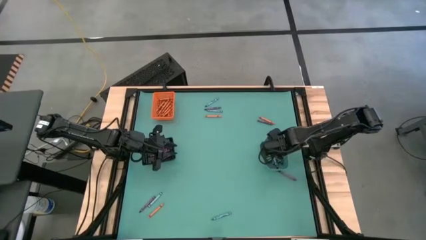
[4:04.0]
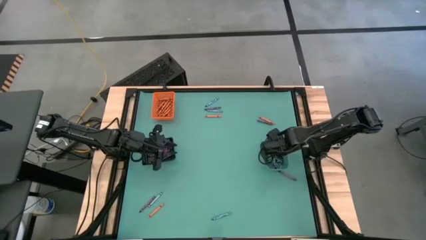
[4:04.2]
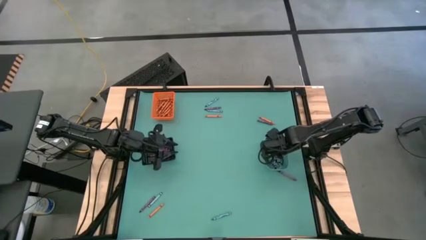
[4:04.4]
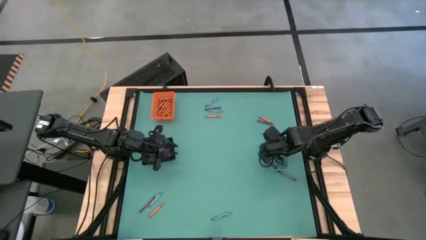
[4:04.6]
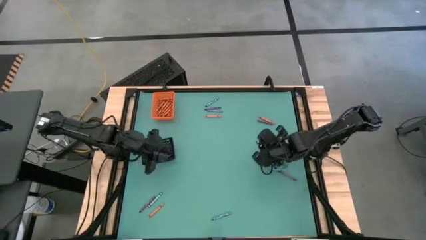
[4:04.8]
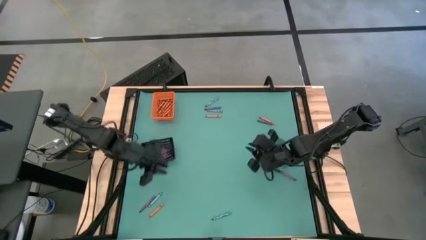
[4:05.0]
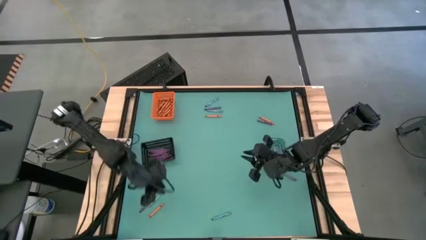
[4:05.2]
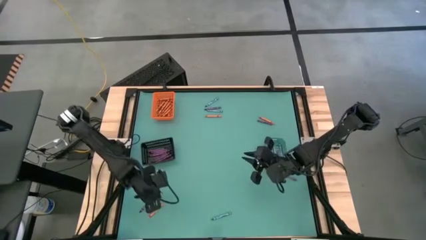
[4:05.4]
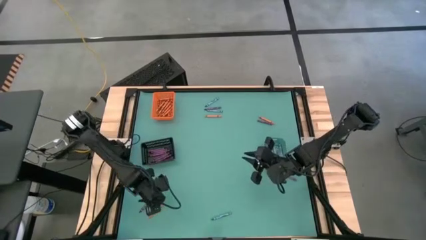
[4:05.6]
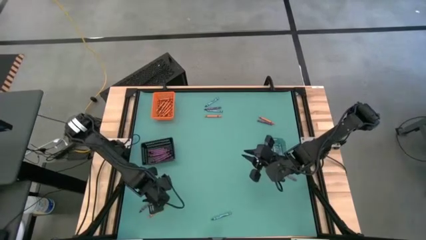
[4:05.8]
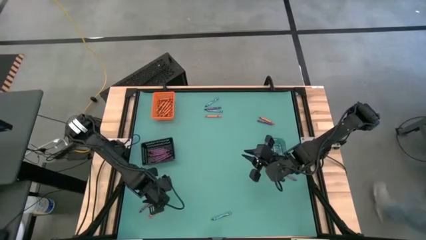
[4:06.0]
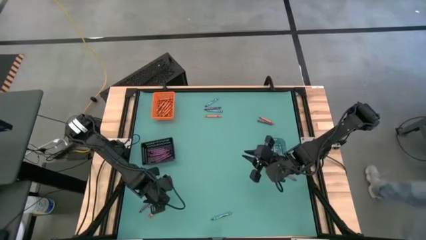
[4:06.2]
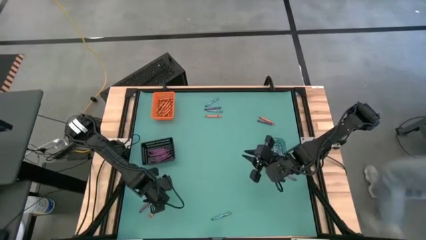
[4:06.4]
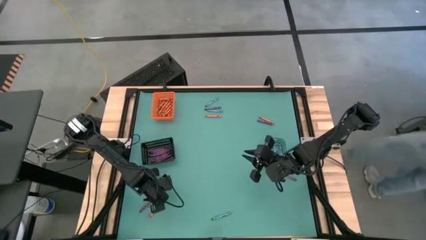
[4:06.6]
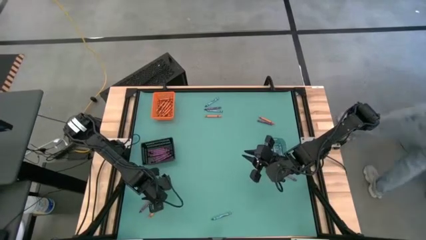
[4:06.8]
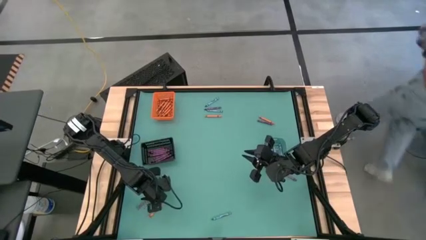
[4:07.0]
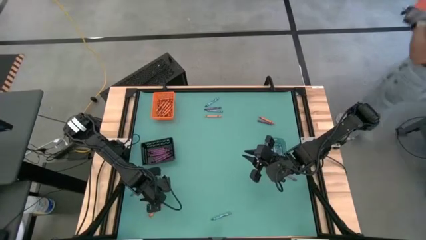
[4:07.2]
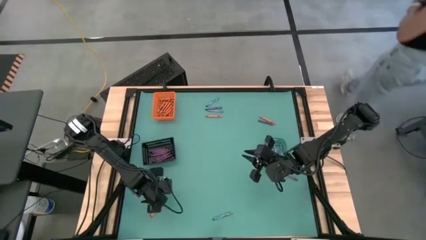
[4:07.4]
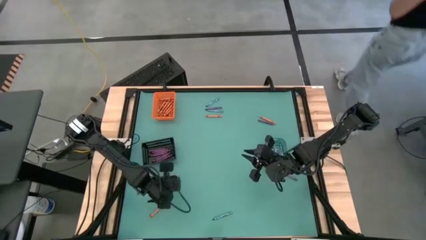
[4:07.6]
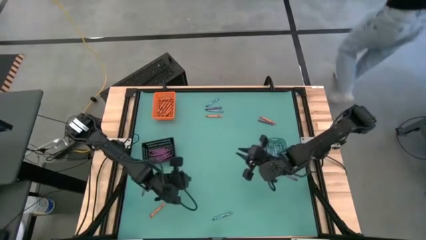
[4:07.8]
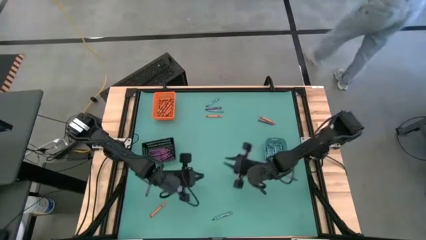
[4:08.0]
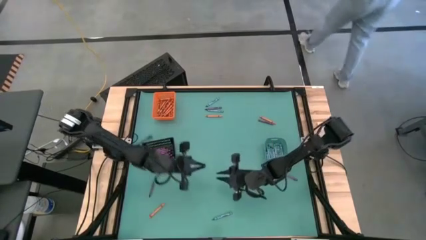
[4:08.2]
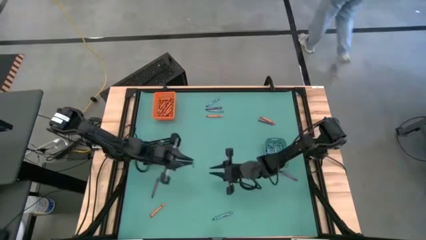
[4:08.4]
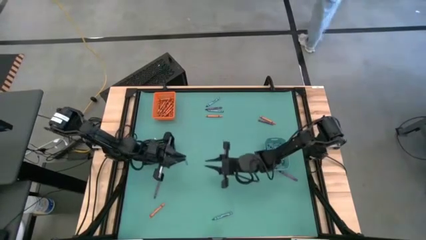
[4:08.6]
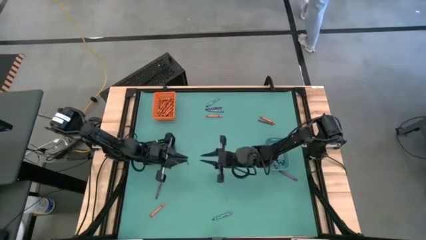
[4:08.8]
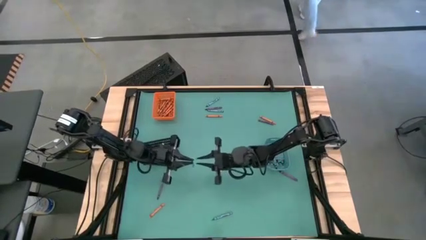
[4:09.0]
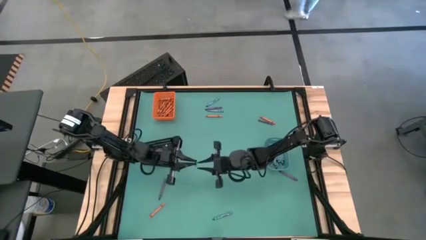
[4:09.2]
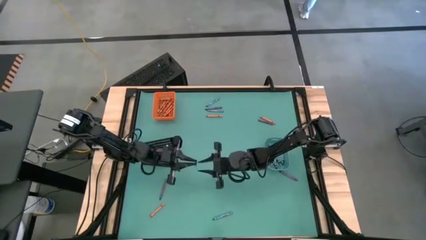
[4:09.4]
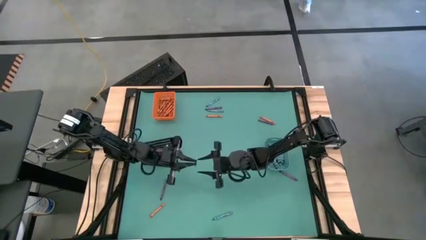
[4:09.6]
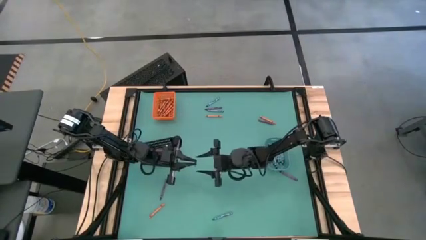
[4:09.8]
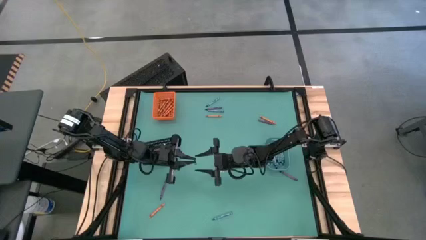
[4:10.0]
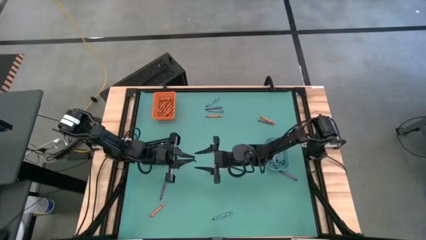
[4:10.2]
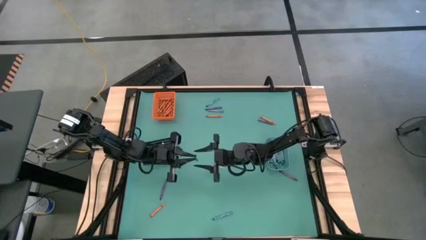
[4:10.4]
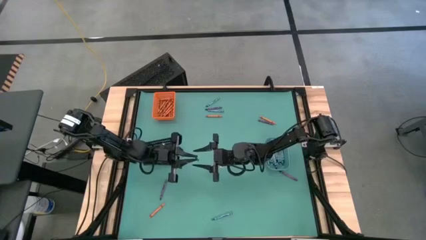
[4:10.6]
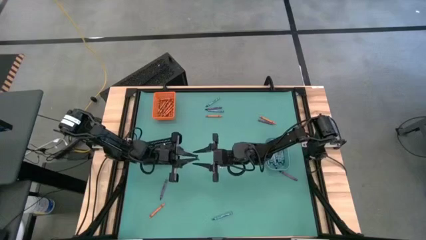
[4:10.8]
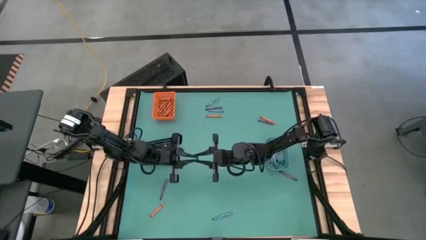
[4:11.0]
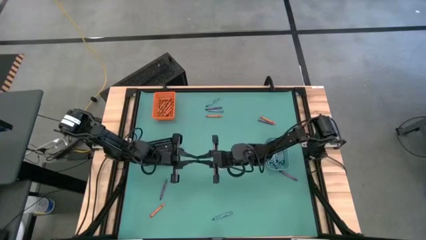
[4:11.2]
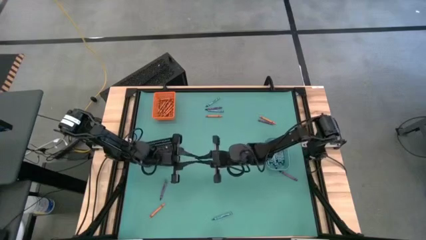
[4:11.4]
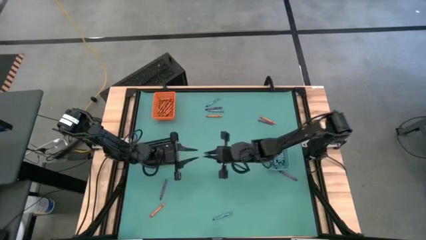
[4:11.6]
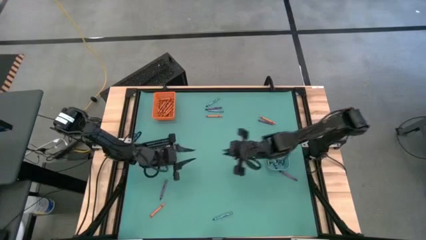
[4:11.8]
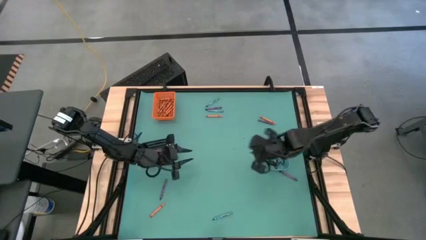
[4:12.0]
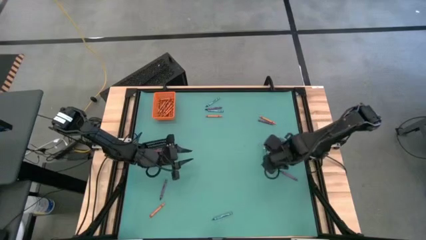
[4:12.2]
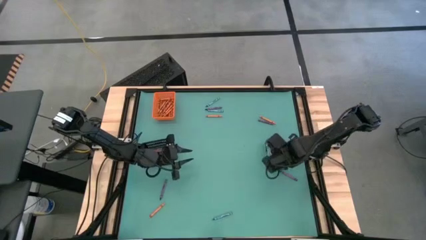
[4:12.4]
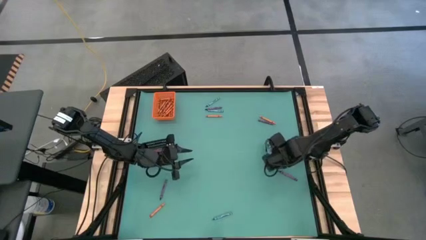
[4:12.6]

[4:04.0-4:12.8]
Task: Sort crayons
Put the blue crayon into the blue bin

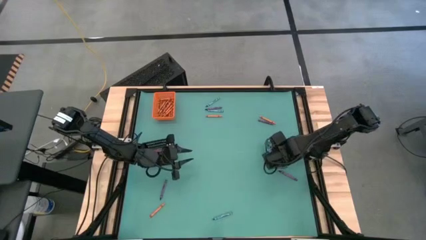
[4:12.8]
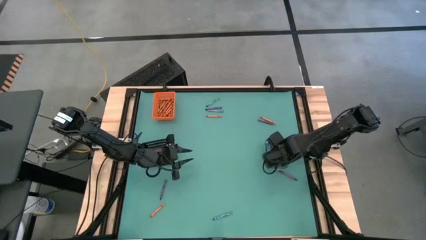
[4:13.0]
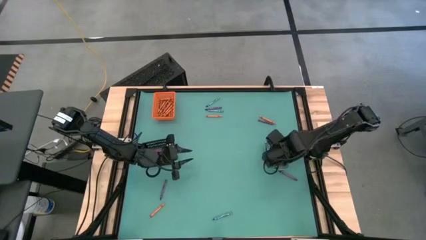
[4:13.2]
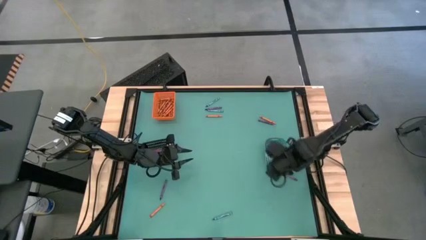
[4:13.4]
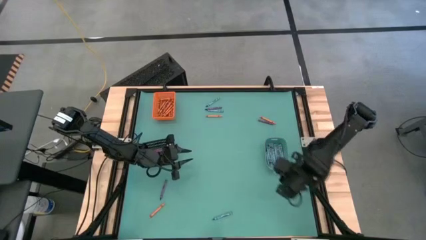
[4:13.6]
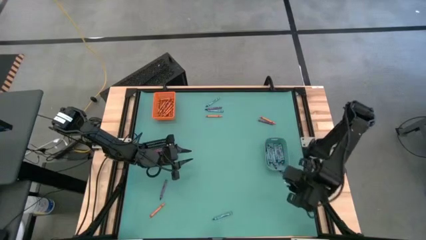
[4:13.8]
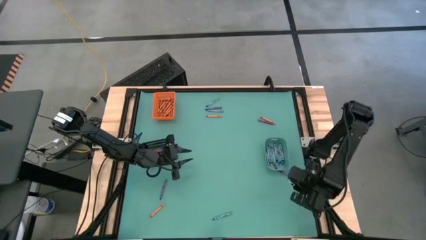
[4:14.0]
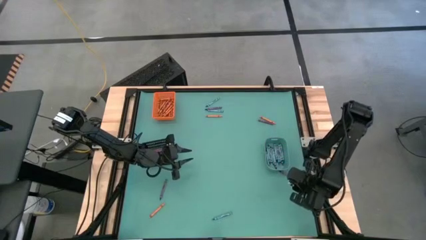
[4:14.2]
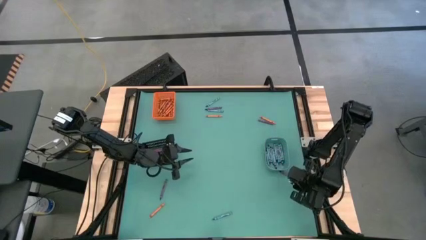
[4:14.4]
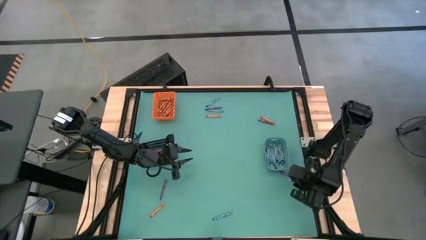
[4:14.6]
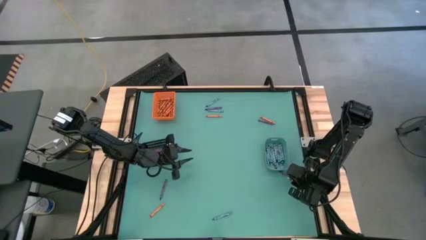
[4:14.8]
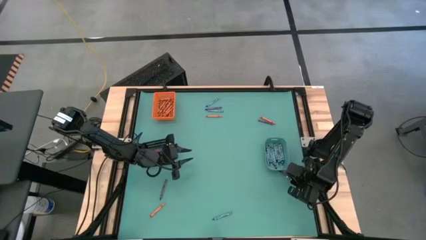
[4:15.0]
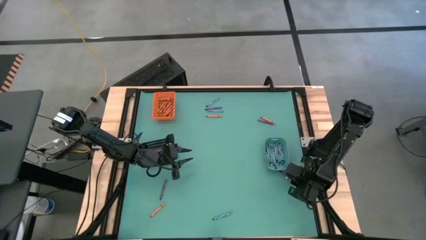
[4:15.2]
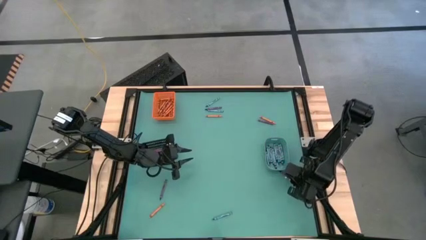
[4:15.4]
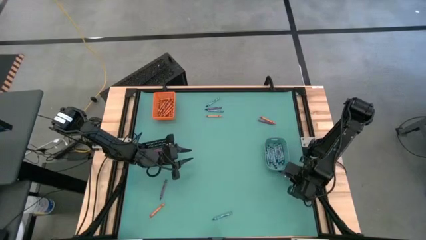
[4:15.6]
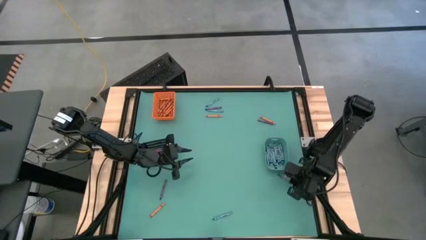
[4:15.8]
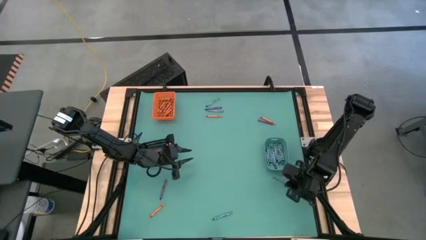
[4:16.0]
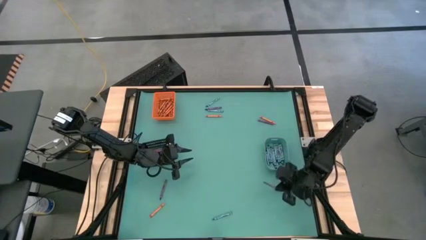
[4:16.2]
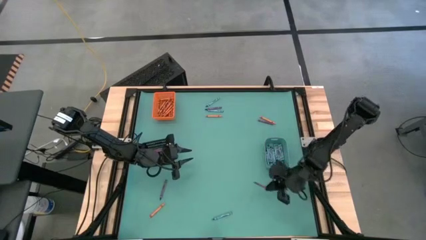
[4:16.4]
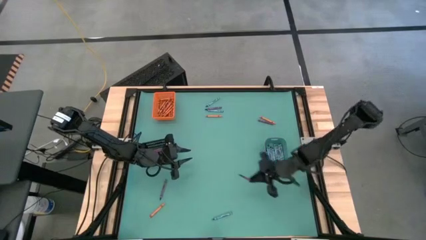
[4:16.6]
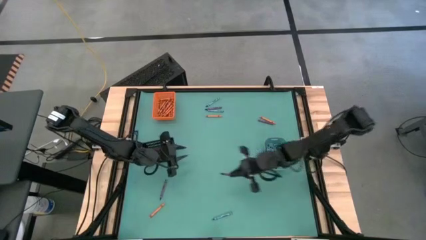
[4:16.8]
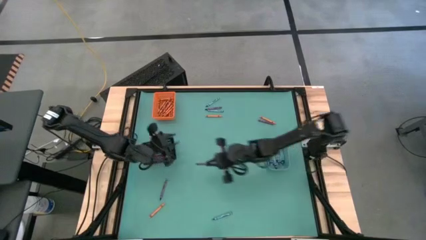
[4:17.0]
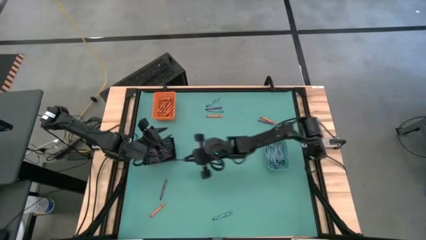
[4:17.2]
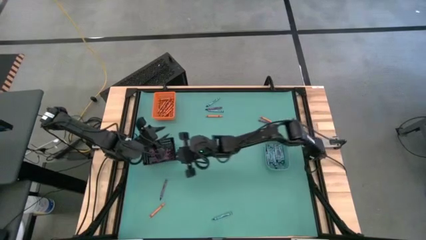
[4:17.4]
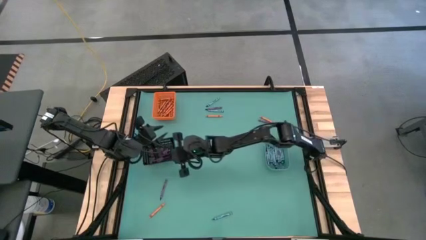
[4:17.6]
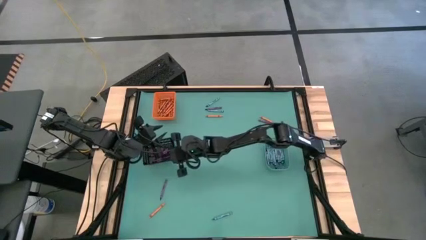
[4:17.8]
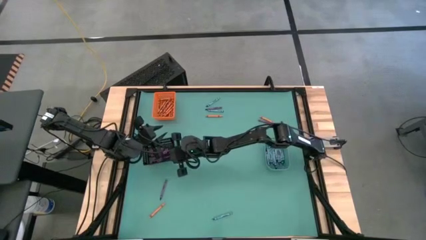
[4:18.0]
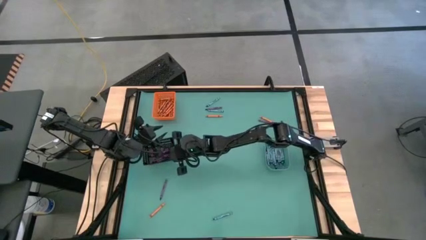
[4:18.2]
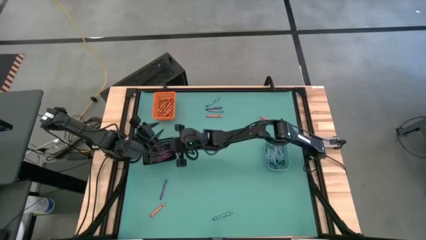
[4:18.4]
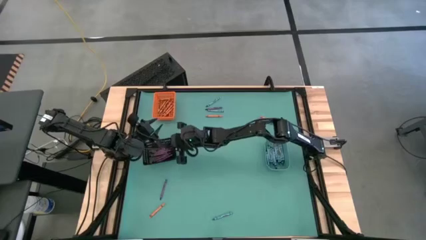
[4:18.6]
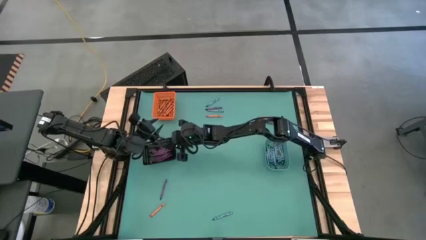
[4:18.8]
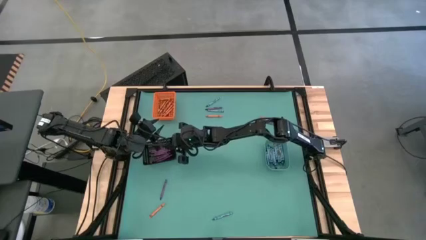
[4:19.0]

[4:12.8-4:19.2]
Put the violet crayon into the black bin

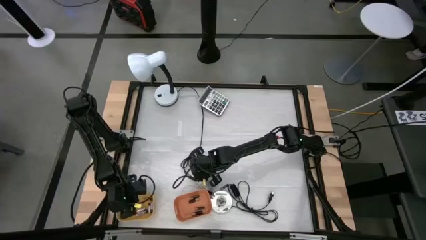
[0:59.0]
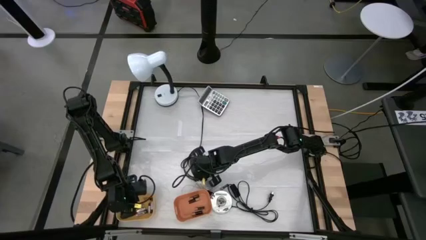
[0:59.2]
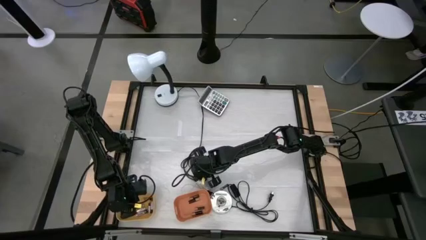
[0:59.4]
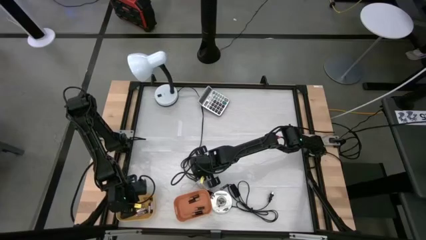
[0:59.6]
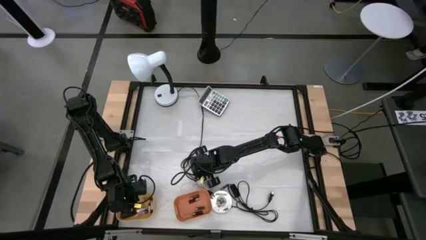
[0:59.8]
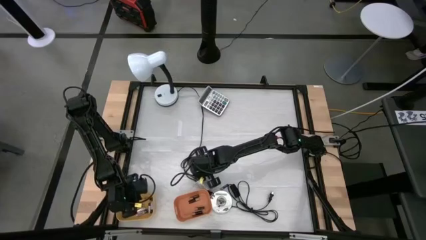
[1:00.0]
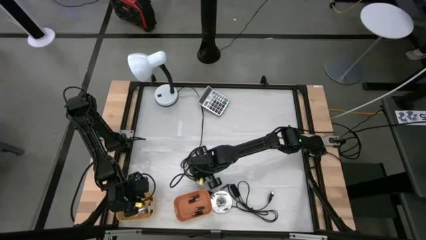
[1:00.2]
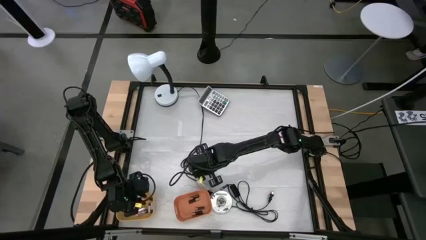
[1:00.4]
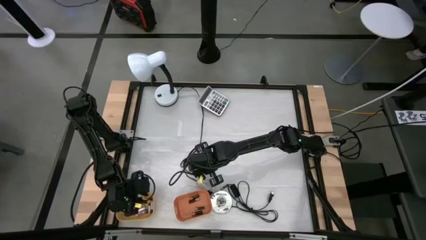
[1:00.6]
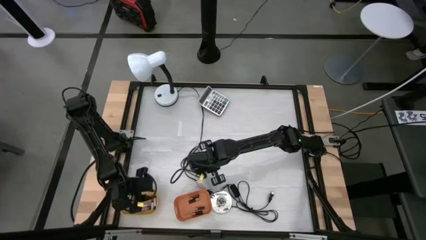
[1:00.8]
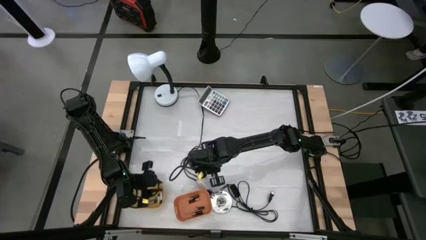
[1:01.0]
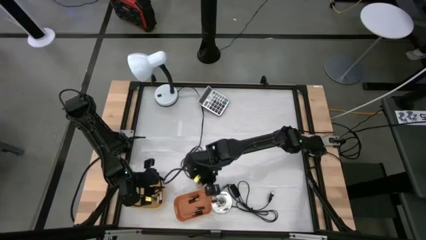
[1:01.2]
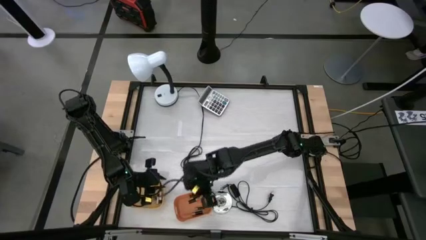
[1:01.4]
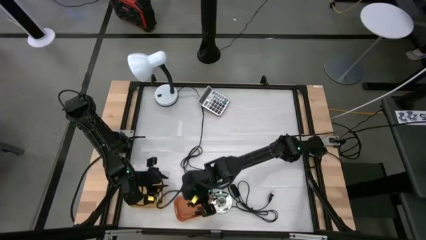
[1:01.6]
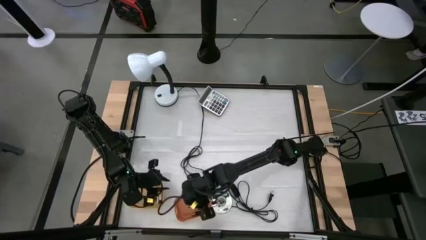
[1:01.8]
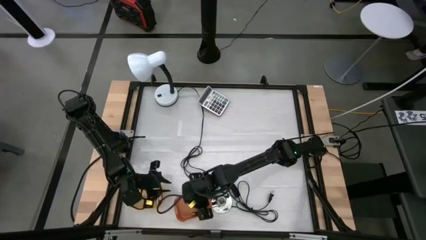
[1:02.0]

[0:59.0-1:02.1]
Task: Sort batteries
Put the black battery into the orange bin
